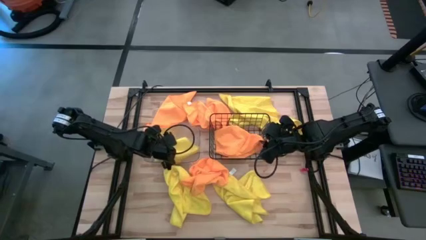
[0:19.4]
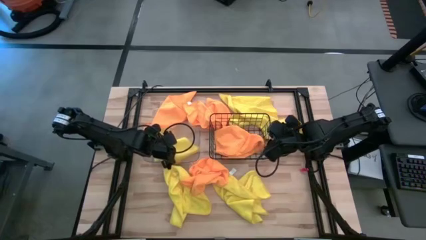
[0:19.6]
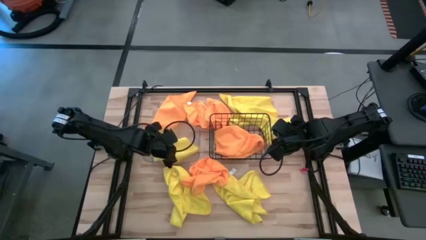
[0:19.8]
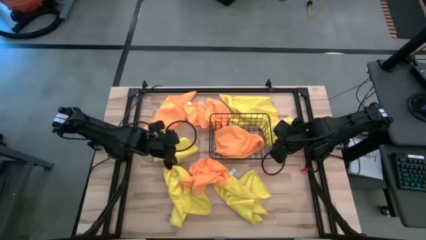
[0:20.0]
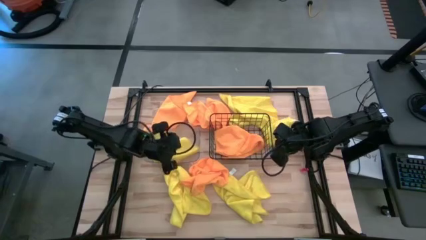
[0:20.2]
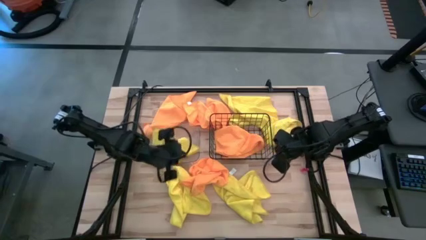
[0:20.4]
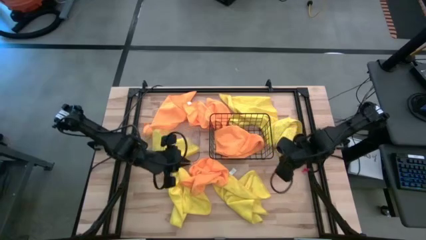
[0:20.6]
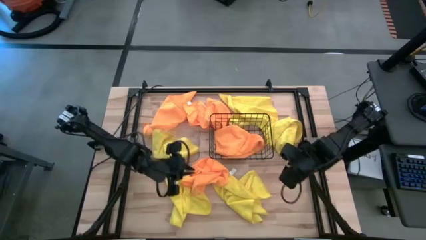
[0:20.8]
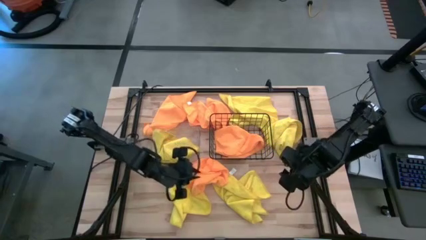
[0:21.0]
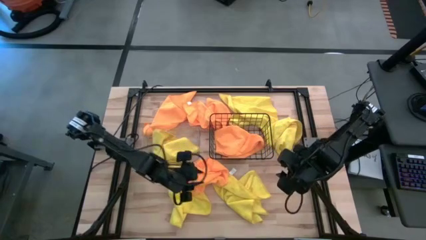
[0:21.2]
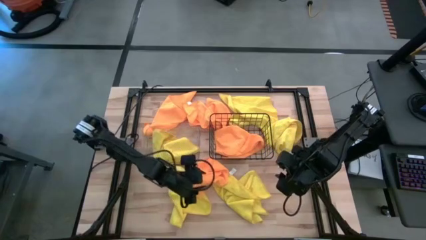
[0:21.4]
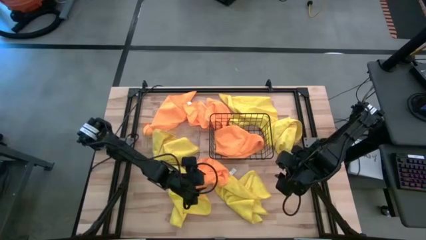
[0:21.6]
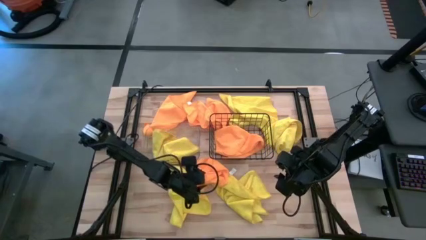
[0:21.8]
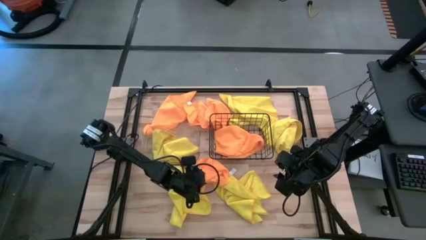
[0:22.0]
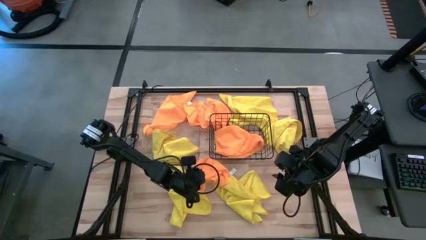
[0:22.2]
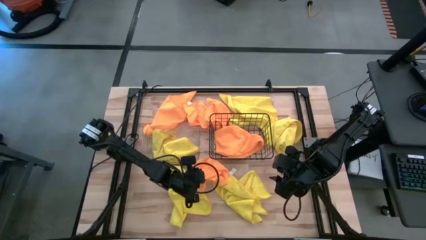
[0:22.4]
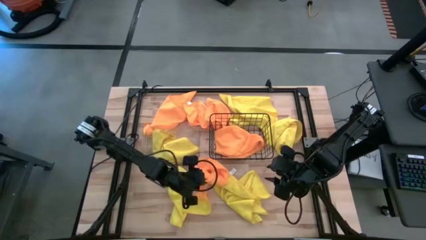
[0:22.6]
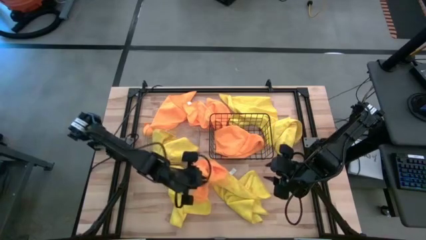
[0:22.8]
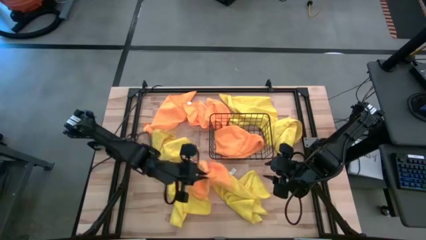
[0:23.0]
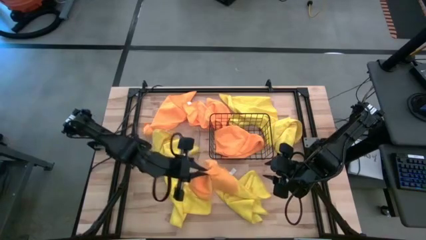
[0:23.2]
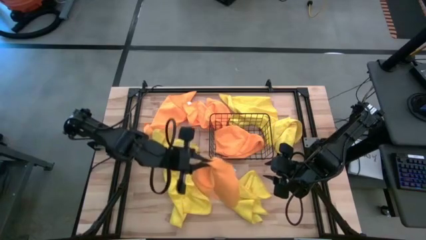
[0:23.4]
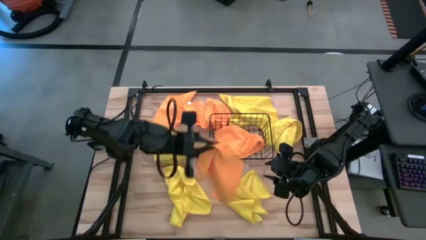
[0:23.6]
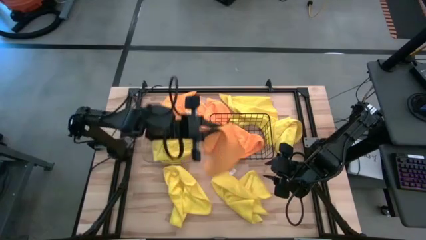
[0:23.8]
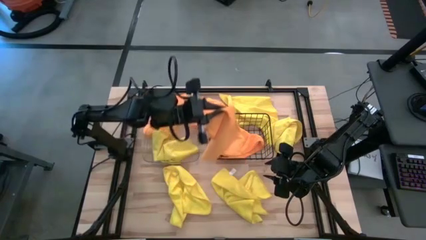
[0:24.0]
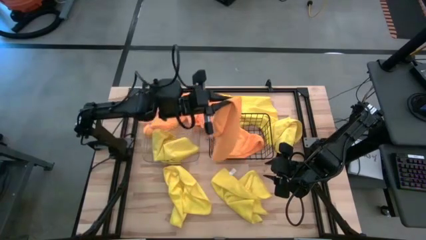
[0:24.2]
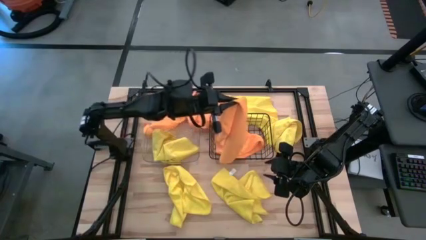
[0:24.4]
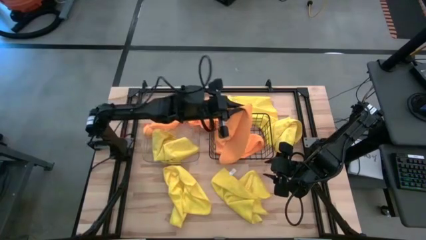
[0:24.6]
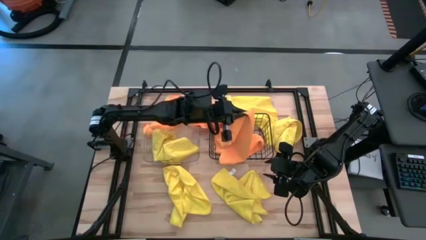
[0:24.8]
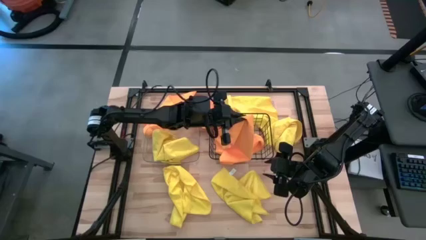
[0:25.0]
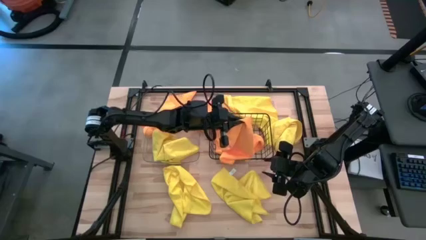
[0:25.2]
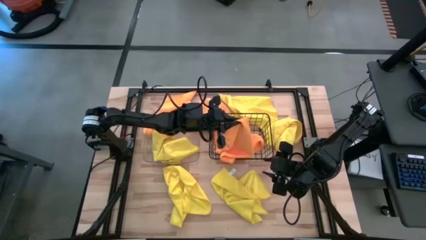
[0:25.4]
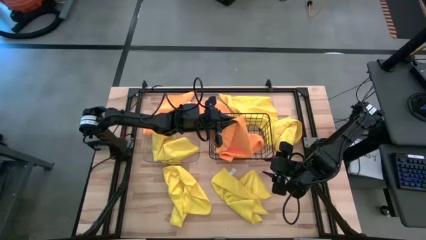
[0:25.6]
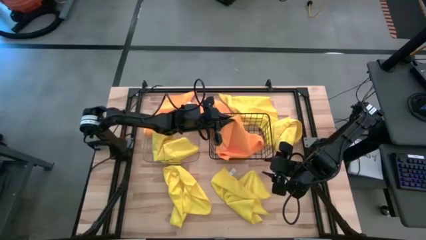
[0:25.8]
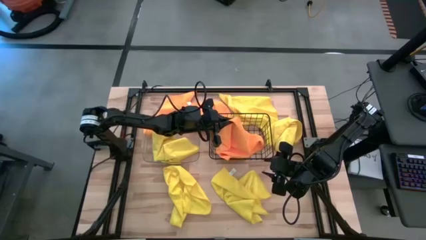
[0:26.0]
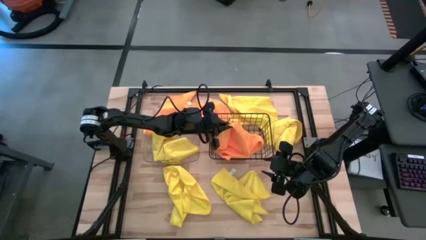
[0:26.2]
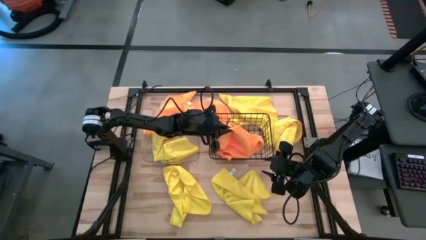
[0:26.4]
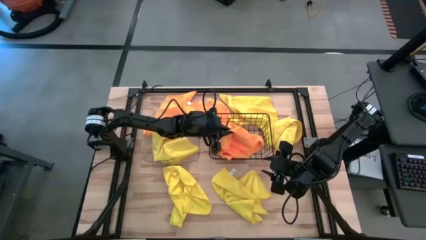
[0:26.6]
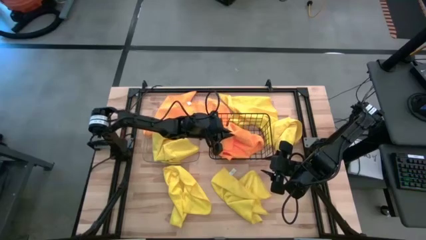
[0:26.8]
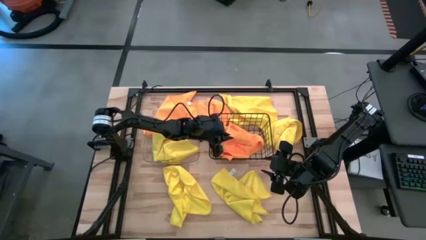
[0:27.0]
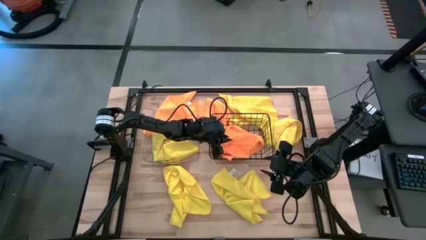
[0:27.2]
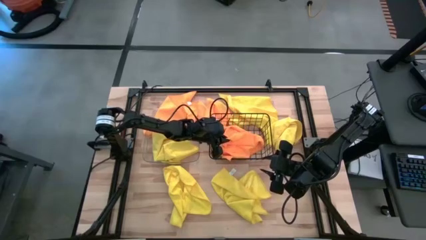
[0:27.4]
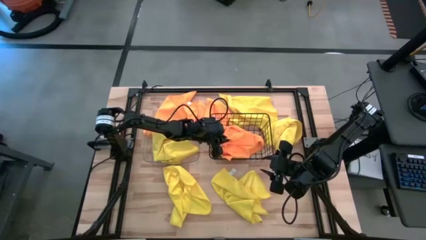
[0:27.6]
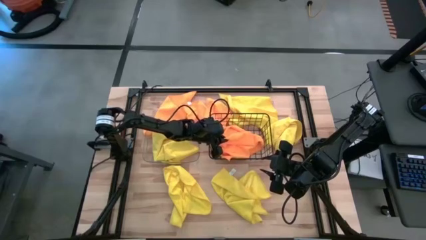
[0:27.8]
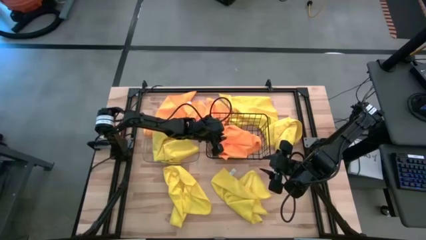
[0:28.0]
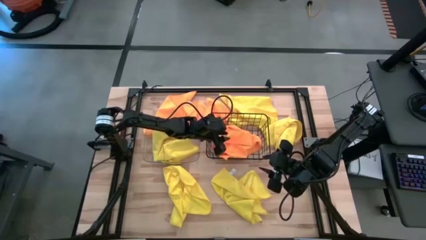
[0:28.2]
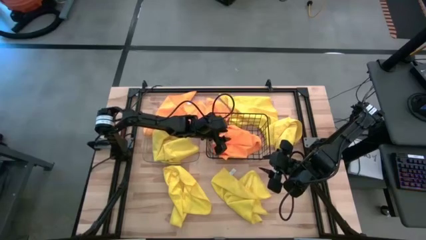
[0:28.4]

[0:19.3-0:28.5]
Task: Sort microfiber towel by color & place in baskets
Put the orange towel into the black wire basket

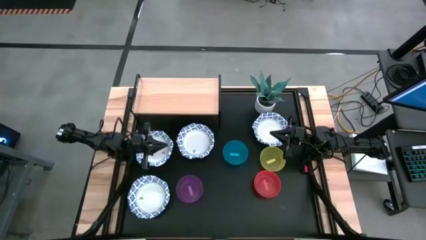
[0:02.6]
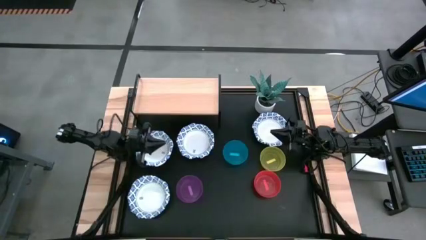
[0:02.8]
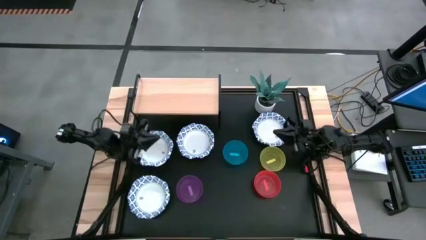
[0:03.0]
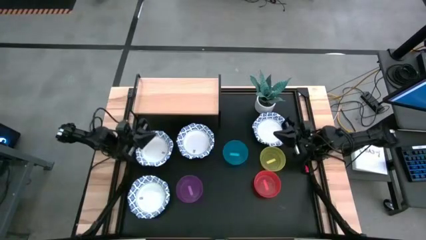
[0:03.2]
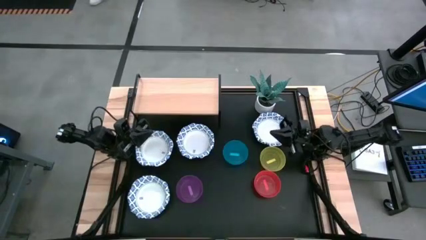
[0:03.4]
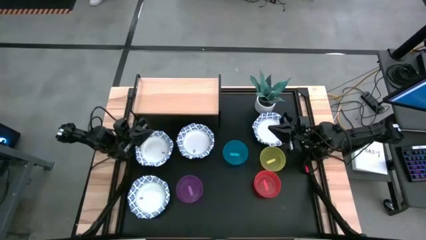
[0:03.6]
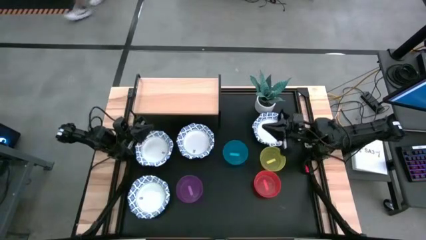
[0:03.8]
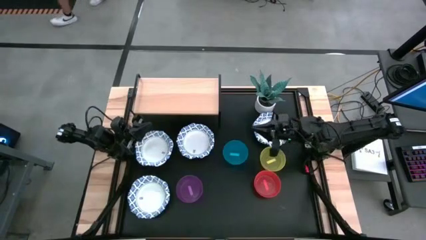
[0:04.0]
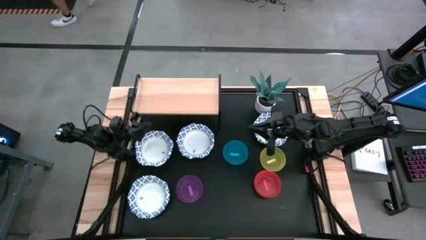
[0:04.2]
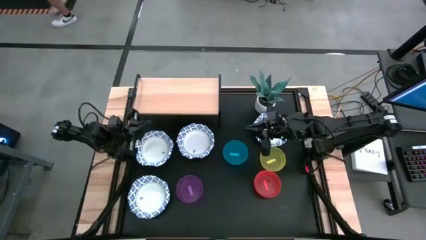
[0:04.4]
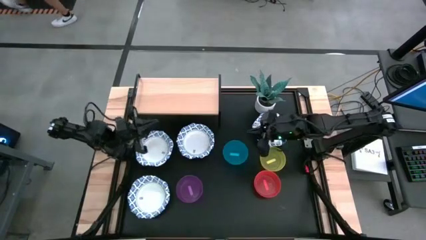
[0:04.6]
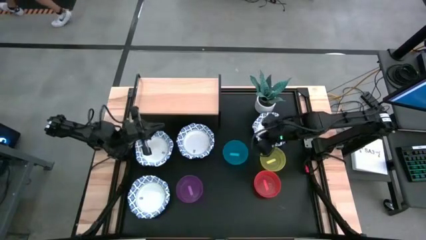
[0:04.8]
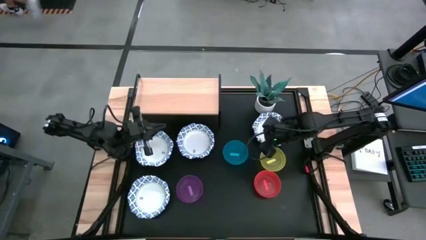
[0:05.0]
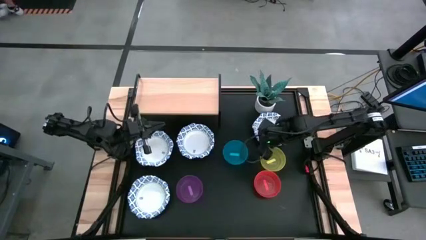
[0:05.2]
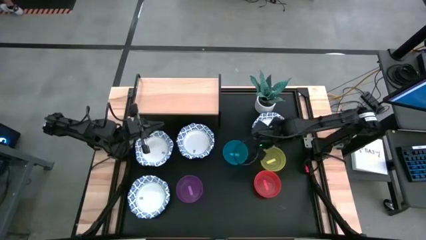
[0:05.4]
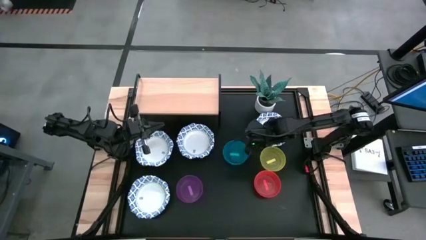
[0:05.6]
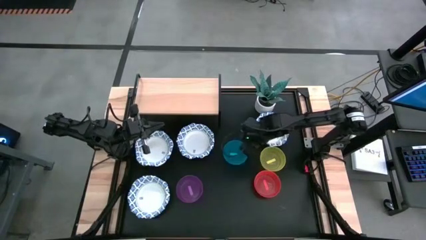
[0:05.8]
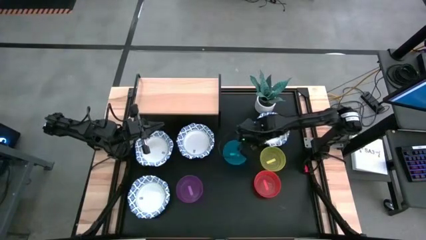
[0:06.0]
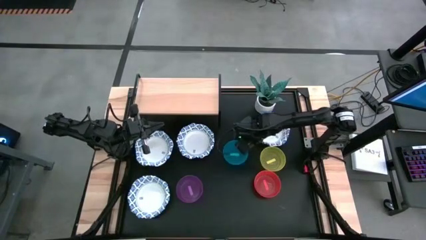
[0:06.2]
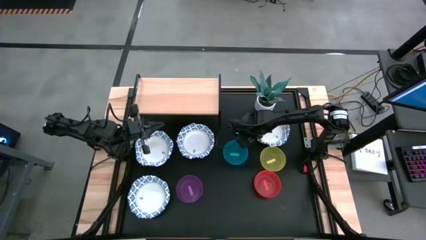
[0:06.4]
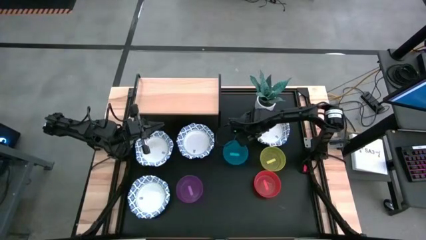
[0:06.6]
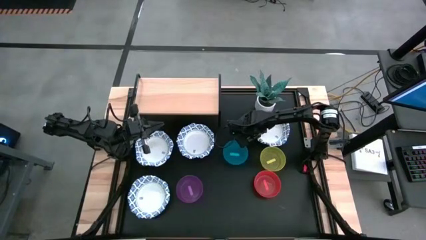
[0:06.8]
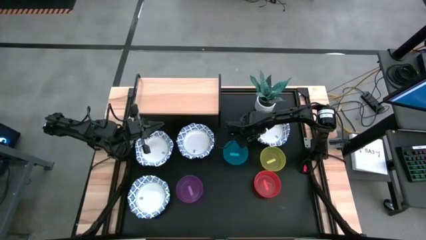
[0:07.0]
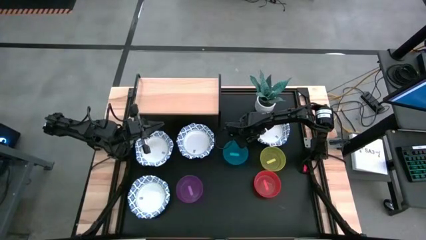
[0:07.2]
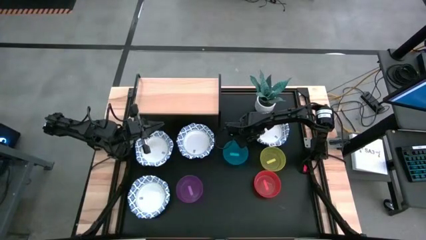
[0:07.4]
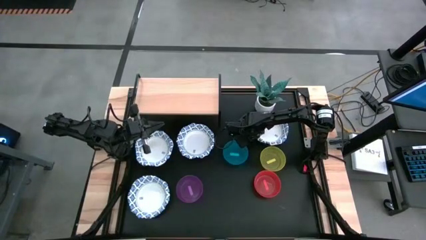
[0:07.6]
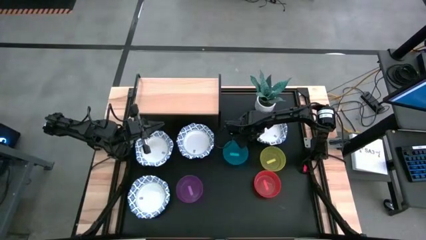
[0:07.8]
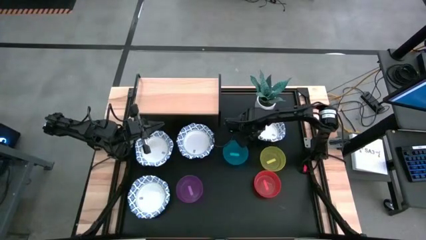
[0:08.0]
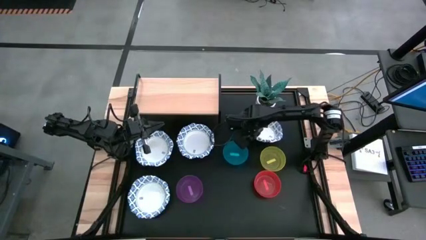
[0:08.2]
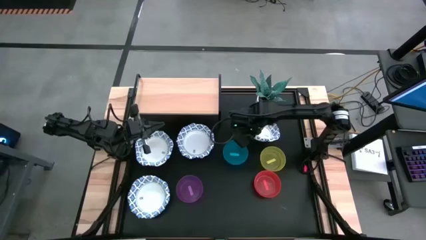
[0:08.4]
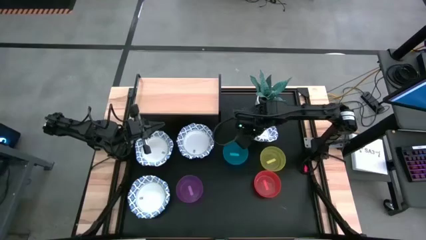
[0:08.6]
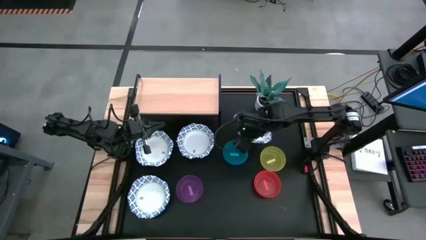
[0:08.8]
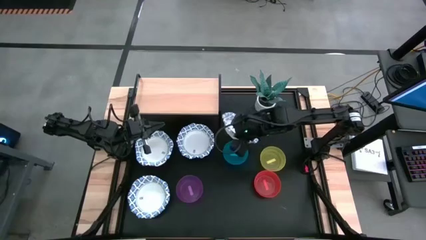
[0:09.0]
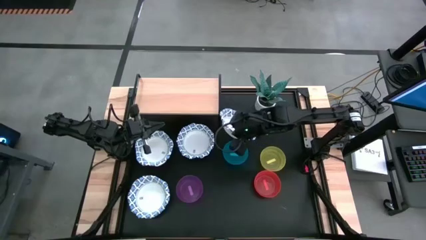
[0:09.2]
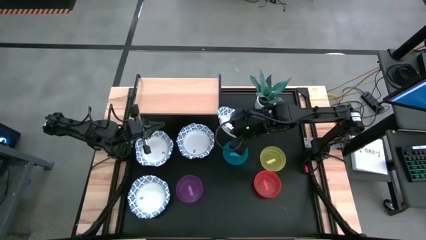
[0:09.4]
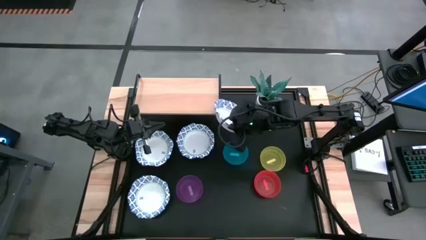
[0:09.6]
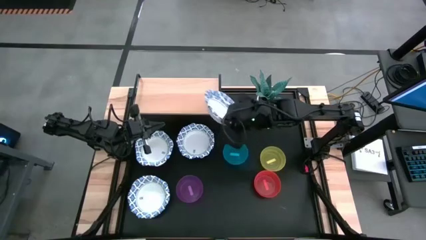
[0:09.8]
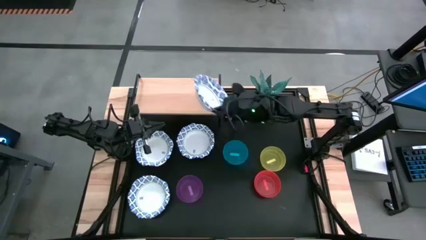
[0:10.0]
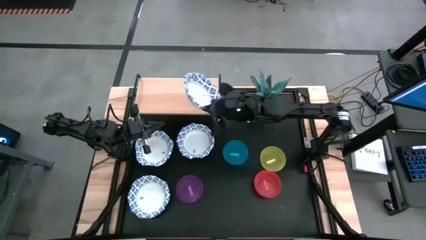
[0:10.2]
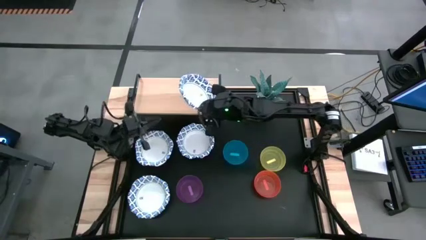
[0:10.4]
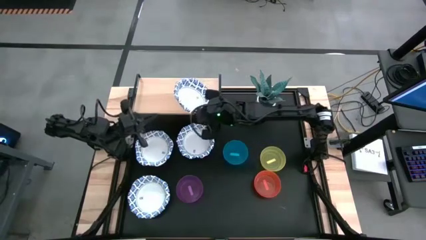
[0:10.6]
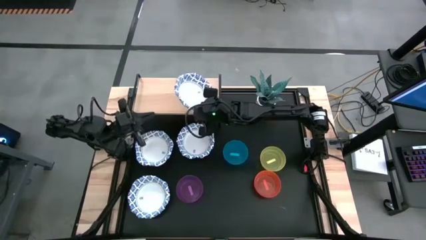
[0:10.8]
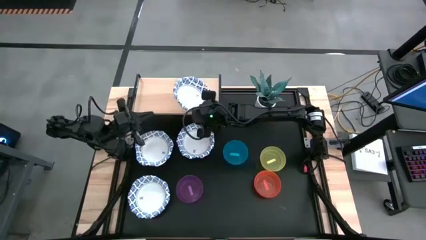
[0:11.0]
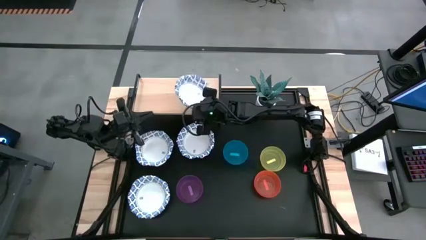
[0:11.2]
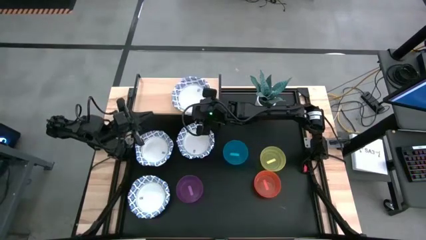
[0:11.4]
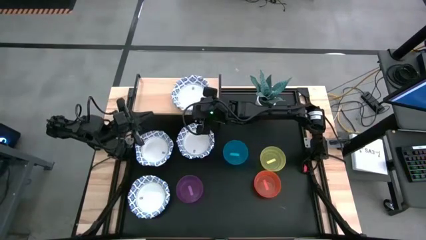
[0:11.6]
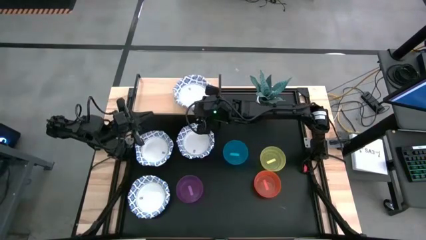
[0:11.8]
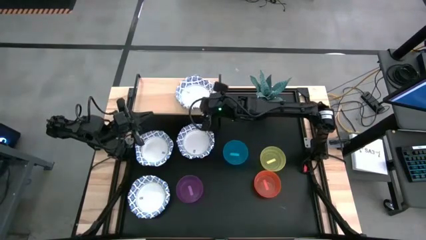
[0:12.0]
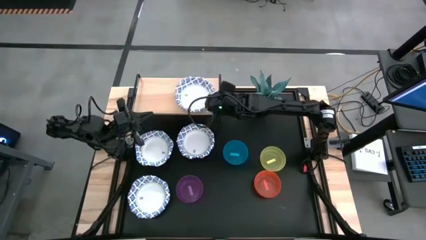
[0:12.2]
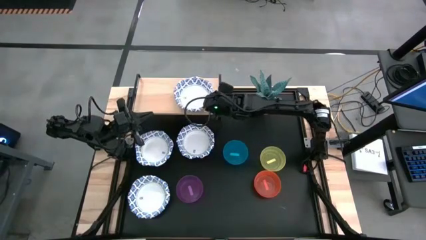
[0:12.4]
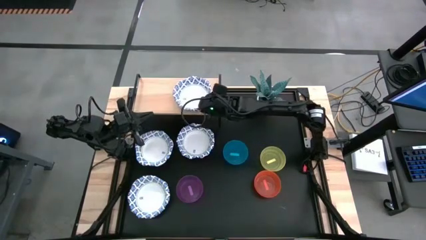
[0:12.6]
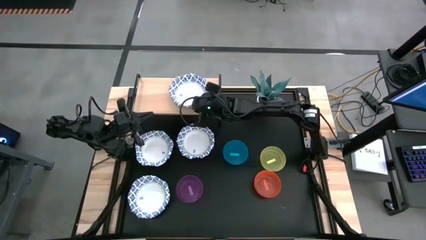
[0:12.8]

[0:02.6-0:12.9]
Task: Place and stack bowls onto a shelf
Put the big white bowl on the shelf
